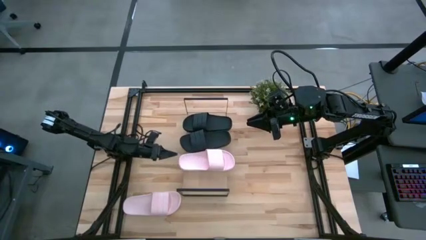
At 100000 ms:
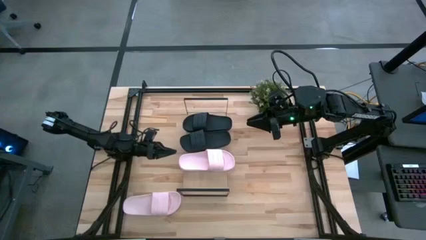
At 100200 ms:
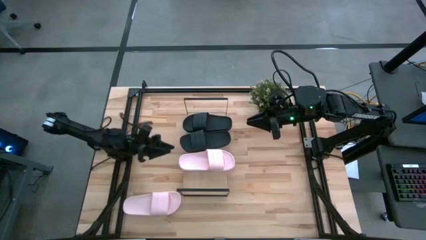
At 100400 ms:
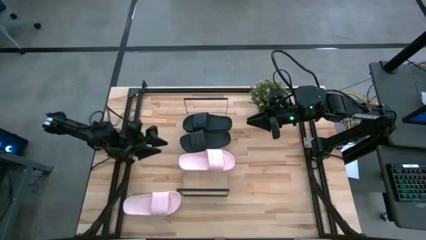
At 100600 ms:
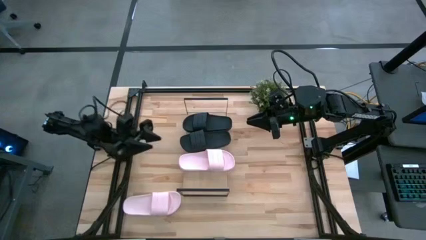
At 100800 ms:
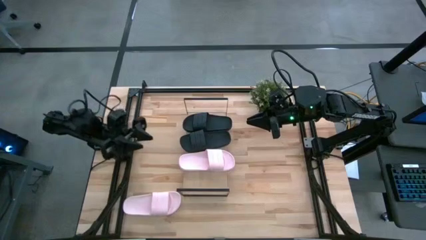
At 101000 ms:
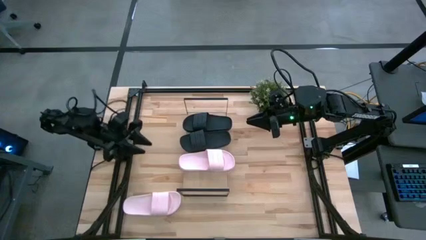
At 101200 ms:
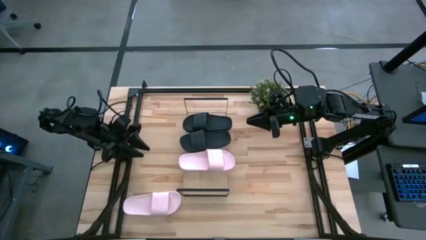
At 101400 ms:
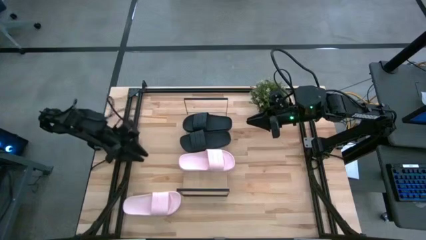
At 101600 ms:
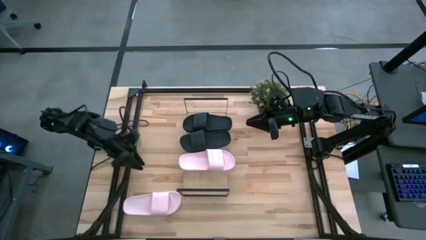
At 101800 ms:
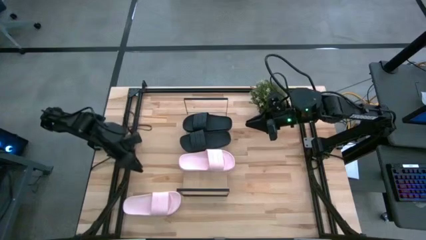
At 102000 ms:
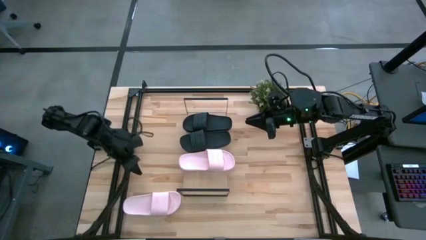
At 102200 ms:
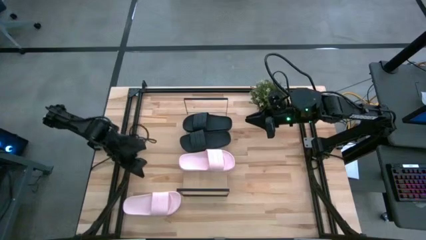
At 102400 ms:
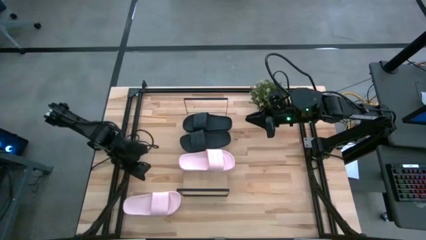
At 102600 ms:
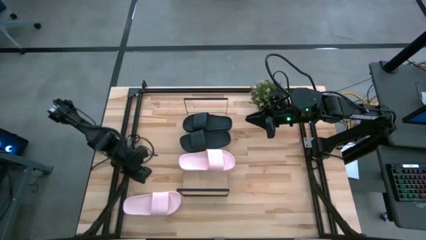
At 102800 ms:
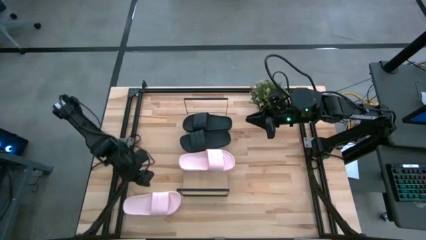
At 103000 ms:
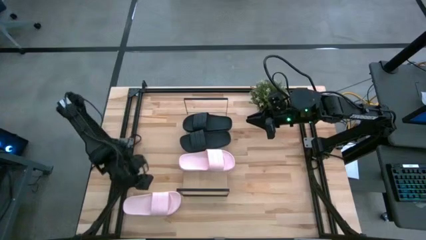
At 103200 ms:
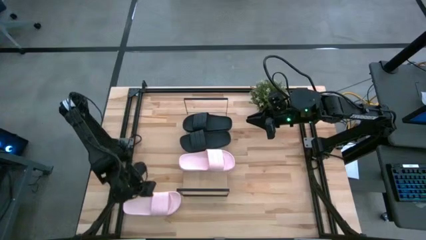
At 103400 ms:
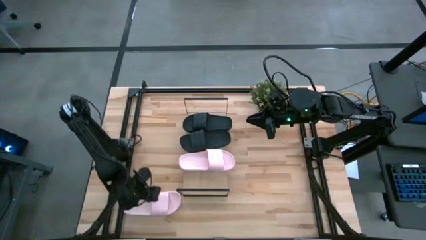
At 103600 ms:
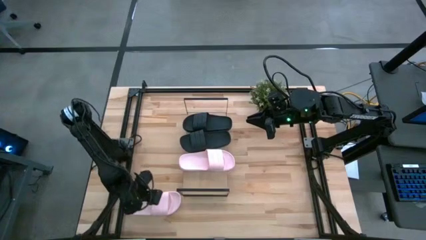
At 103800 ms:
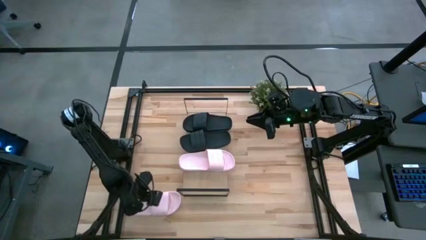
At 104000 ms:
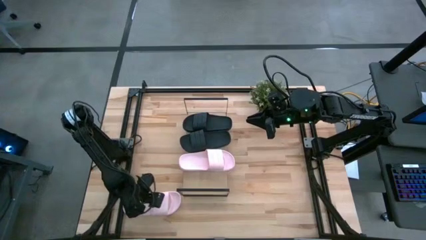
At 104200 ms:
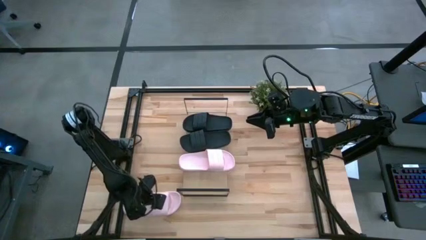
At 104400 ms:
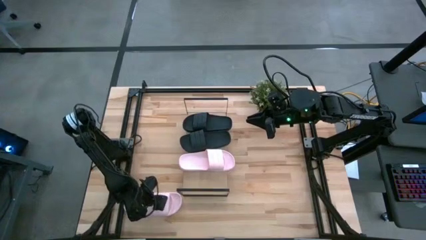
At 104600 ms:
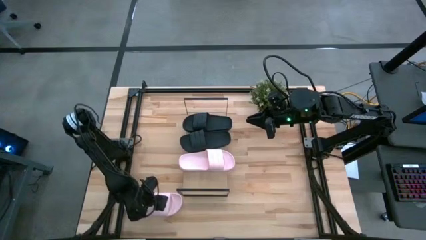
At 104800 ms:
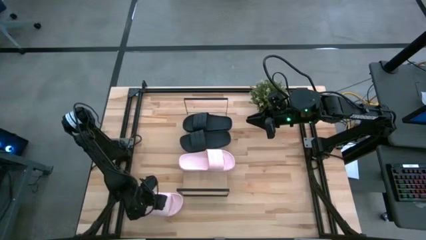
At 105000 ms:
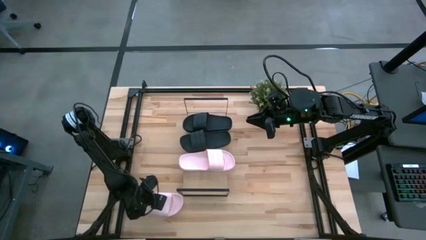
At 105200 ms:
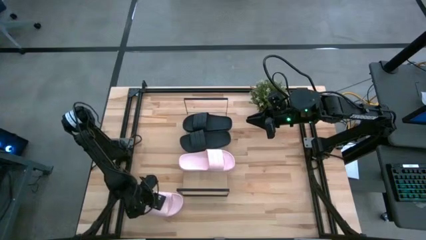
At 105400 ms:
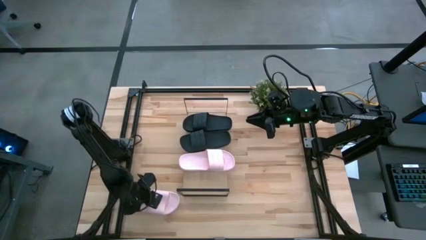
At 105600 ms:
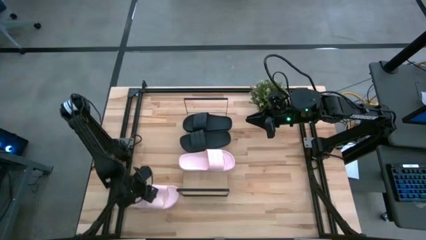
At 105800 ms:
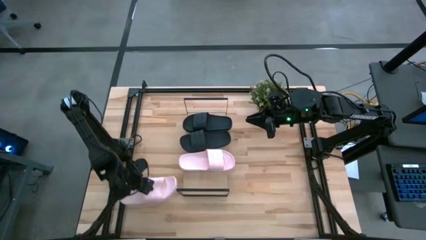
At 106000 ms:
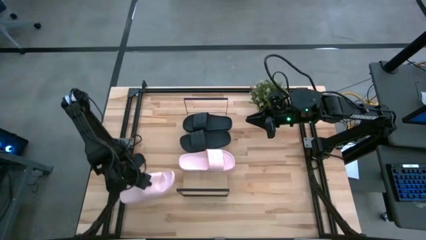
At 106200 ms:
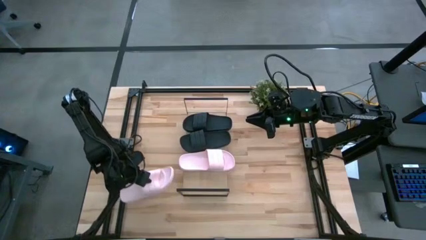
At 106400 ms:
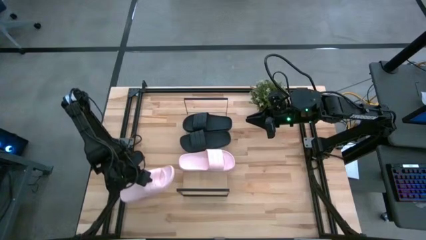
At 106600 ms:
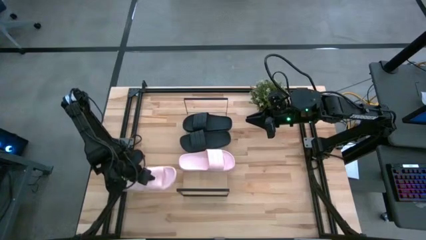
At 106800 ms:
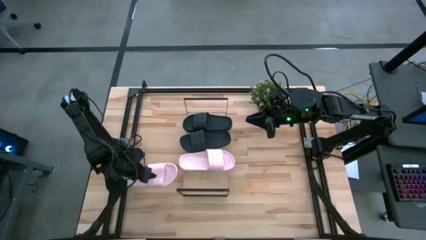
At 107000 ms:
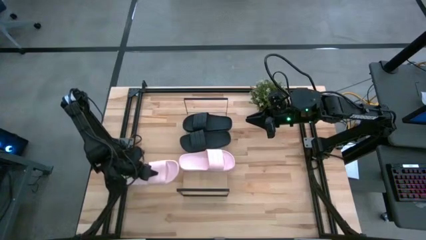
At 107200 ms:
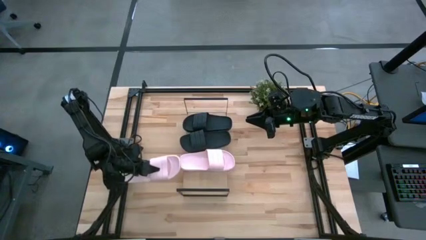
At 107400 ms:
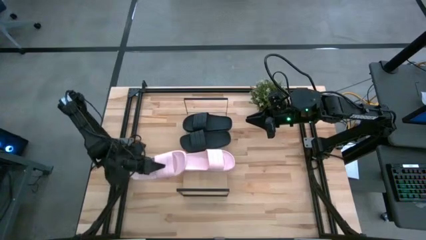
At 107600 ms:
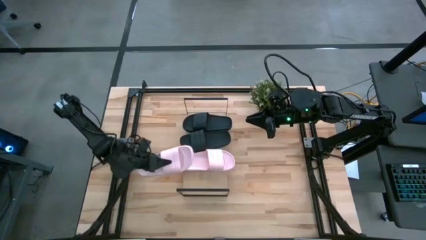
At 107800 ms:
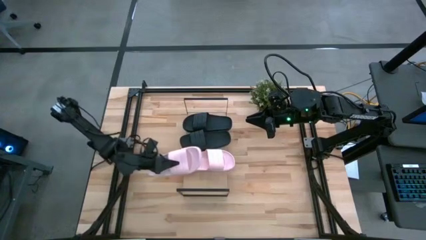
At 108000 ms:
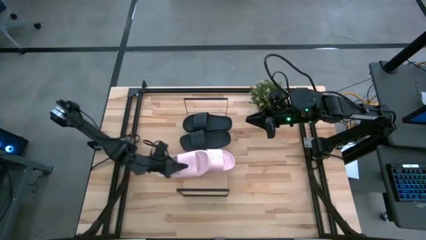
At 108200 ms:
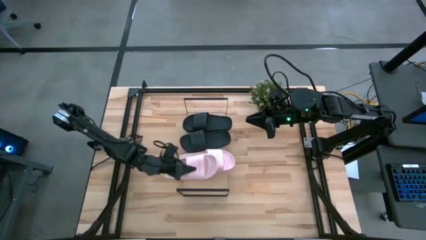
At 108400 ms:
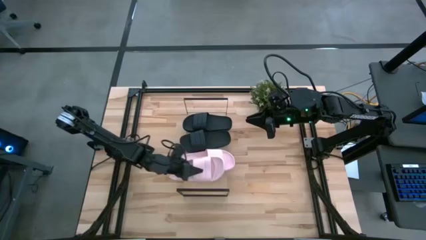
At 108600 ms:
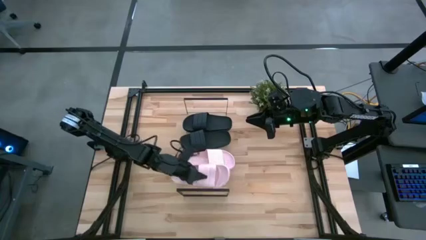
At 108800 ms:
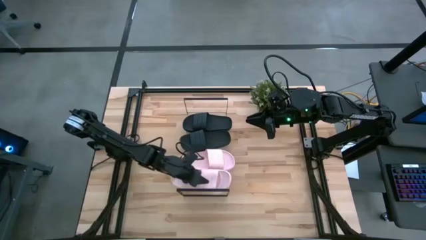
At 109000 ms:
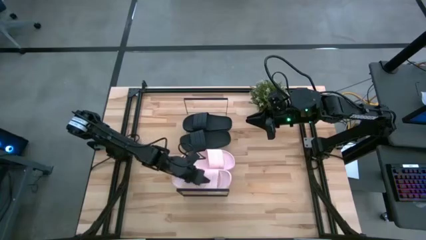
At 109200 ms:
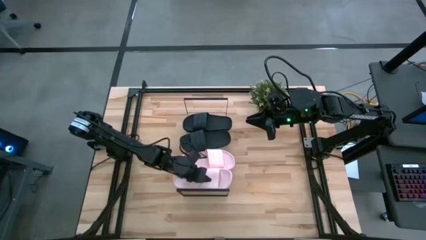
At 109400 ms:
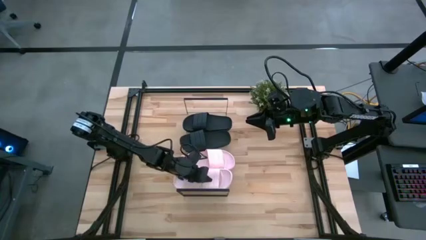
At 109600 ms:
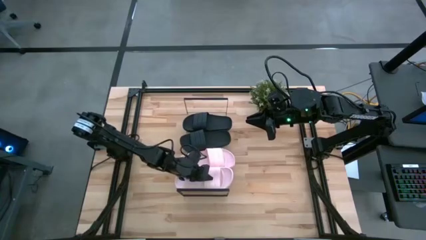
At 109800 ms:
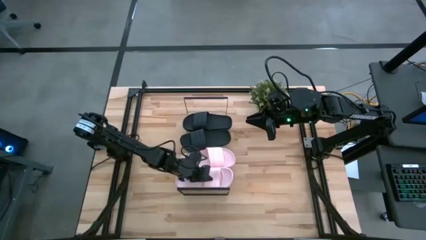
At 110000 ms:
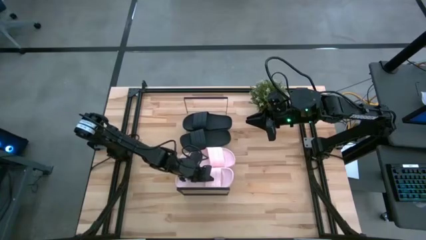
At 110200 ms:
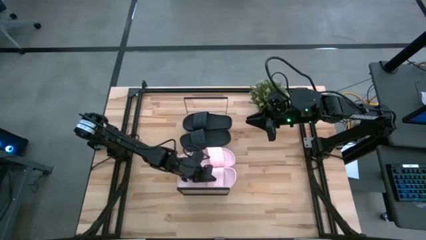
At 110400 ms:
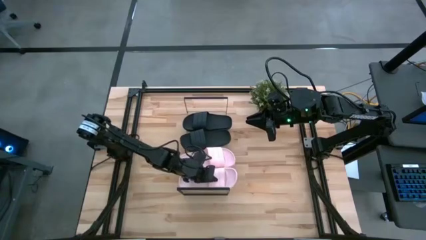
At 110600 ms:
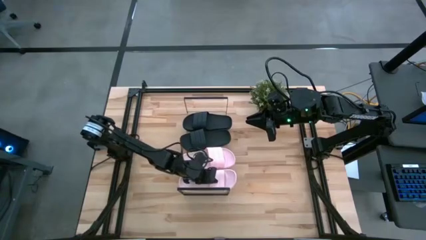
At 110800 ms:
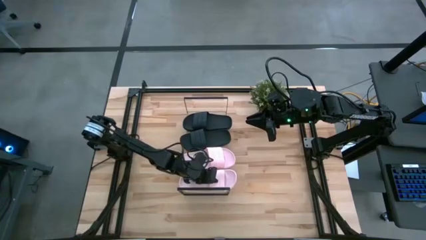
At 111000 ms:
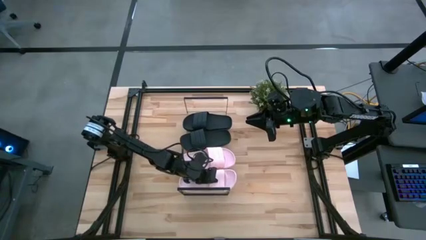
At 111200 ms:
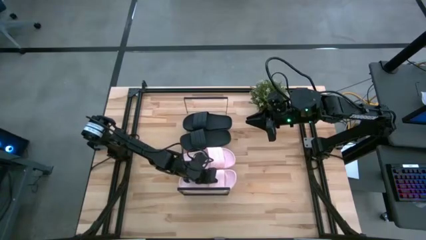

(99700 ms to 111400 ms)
Task: Pick and place slides into the shelf
Put the light pink slide on the shelf
